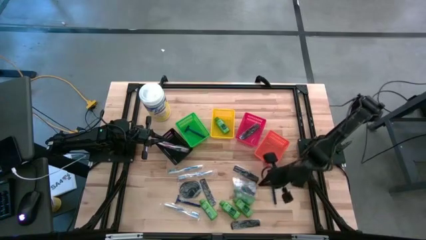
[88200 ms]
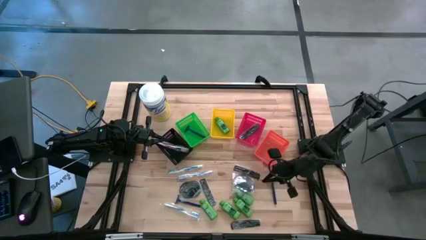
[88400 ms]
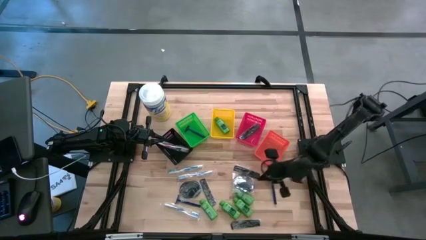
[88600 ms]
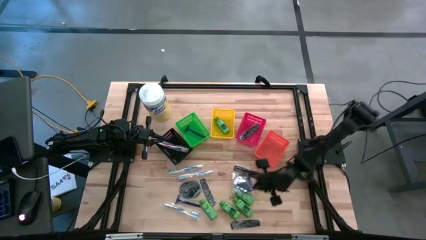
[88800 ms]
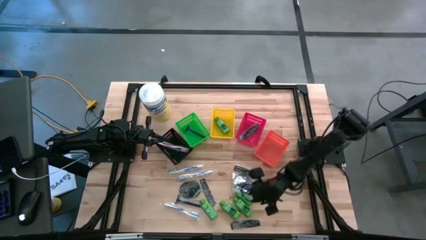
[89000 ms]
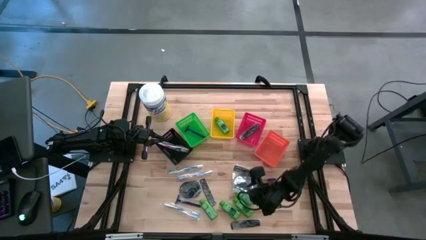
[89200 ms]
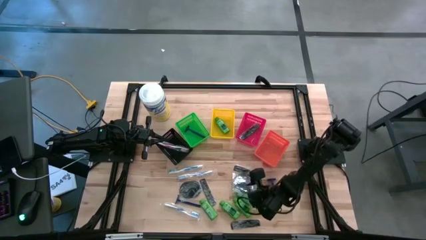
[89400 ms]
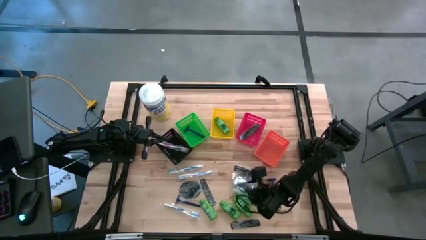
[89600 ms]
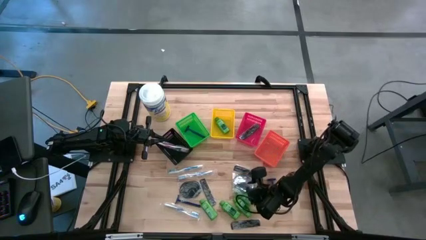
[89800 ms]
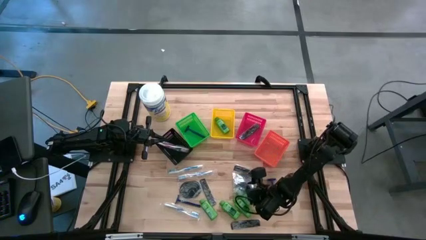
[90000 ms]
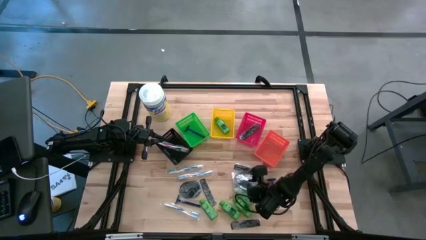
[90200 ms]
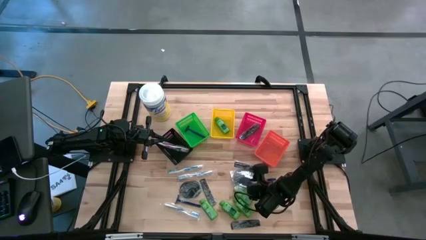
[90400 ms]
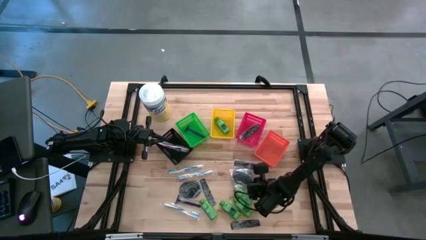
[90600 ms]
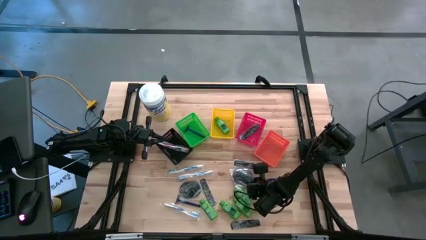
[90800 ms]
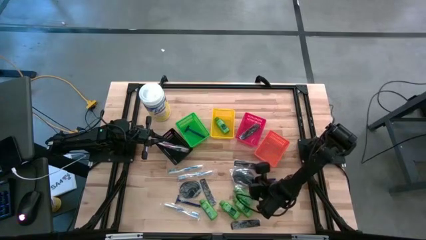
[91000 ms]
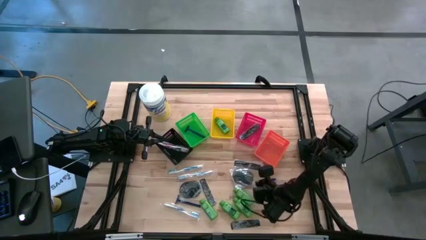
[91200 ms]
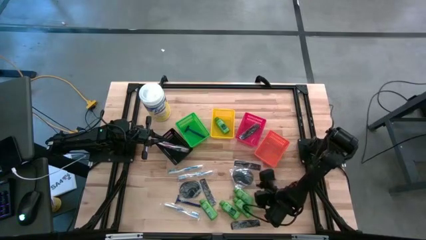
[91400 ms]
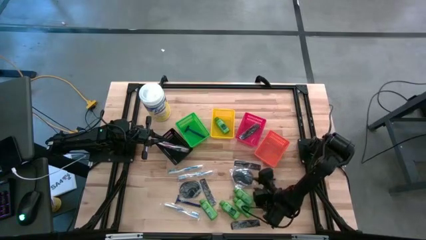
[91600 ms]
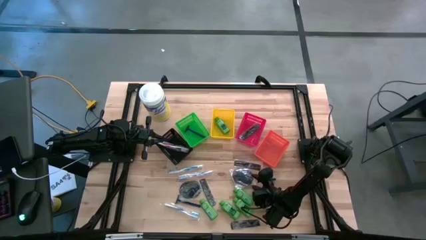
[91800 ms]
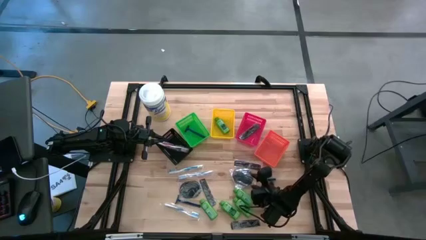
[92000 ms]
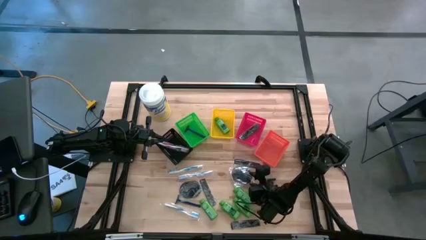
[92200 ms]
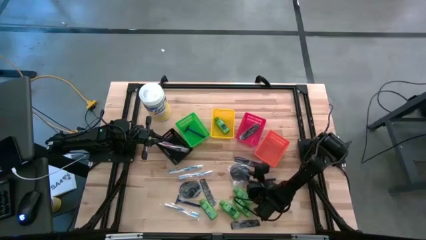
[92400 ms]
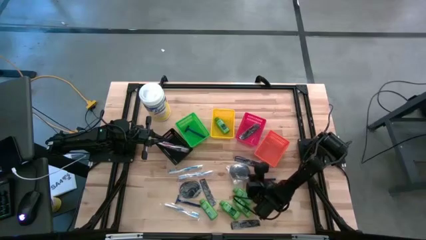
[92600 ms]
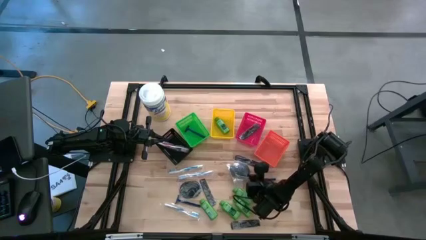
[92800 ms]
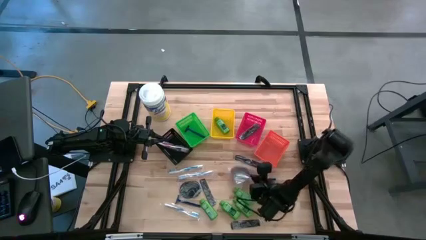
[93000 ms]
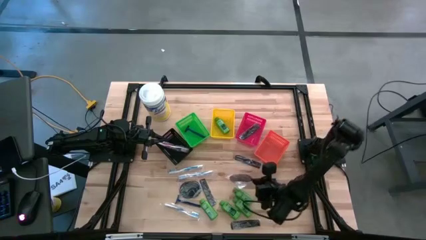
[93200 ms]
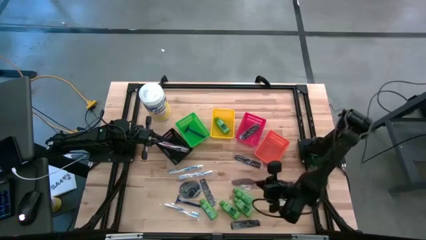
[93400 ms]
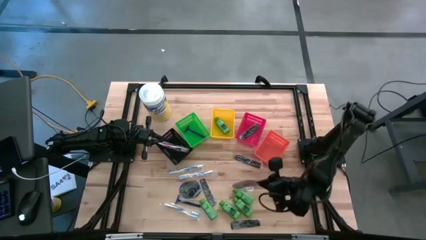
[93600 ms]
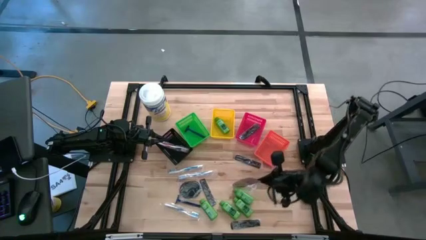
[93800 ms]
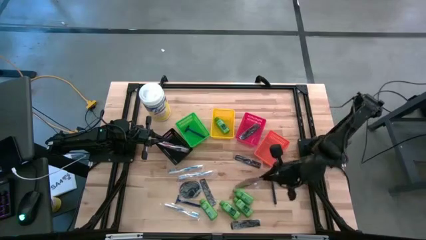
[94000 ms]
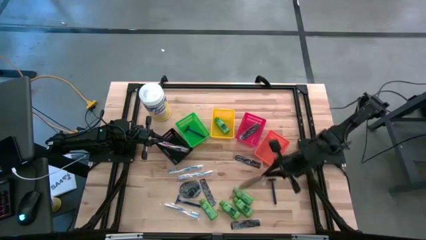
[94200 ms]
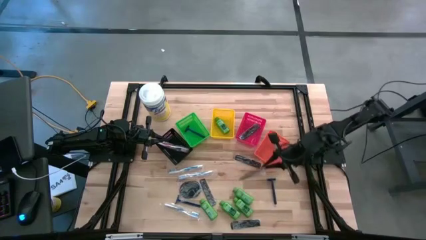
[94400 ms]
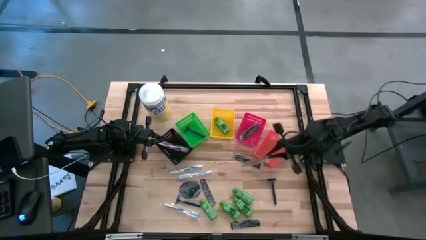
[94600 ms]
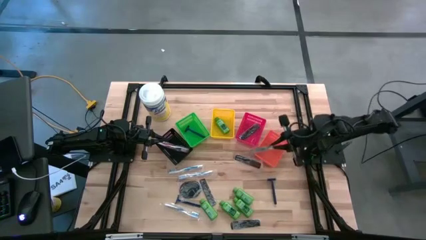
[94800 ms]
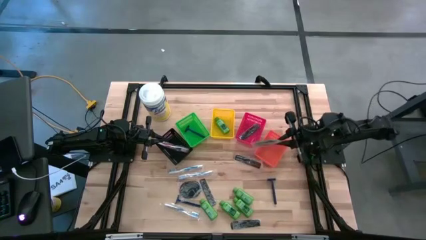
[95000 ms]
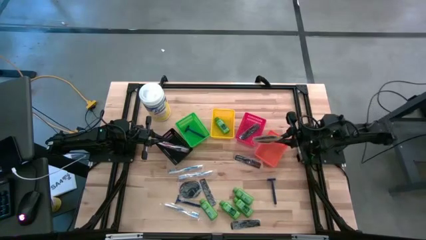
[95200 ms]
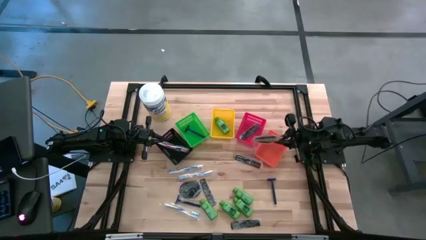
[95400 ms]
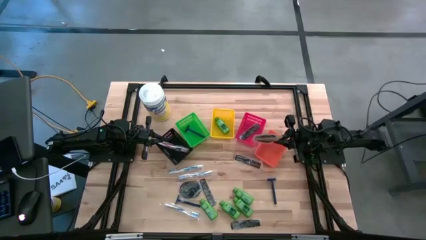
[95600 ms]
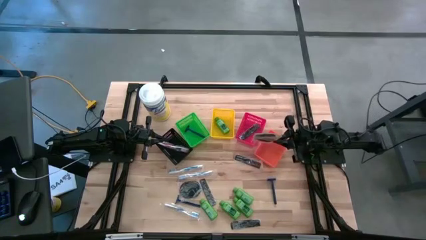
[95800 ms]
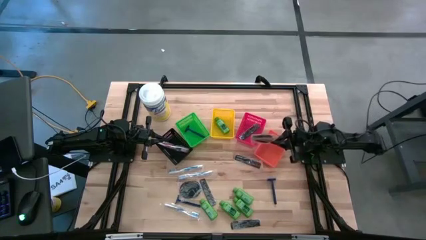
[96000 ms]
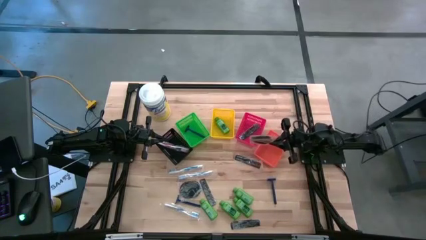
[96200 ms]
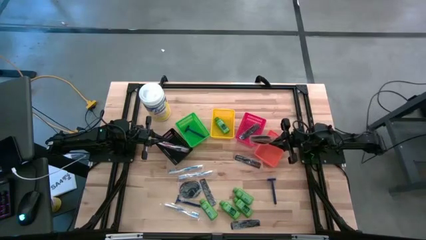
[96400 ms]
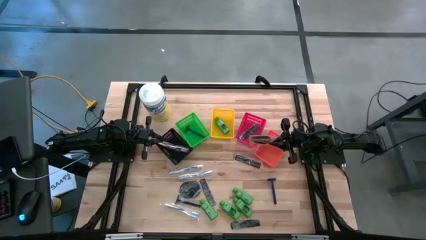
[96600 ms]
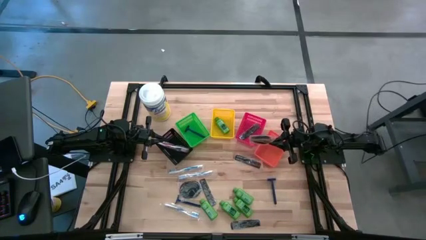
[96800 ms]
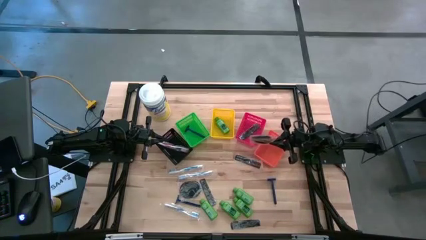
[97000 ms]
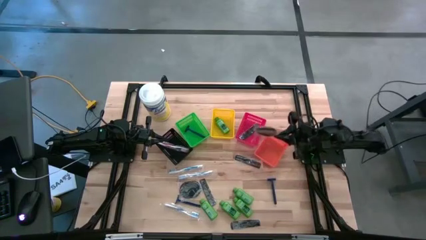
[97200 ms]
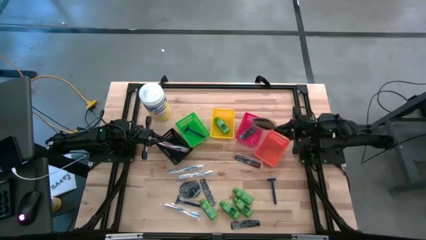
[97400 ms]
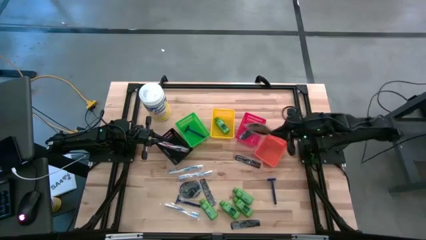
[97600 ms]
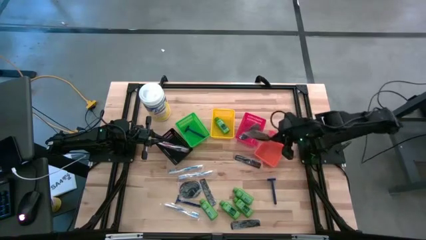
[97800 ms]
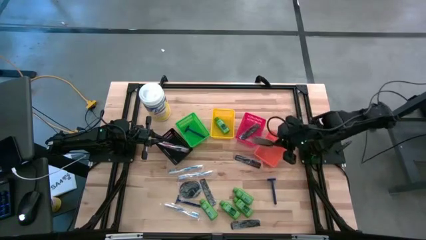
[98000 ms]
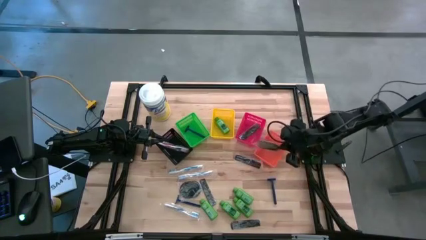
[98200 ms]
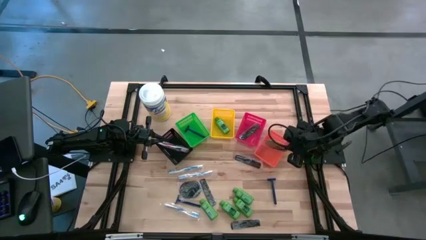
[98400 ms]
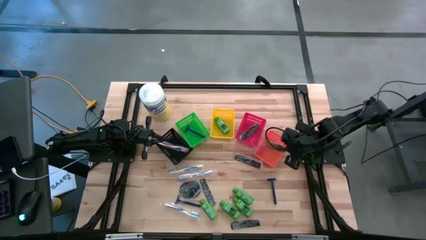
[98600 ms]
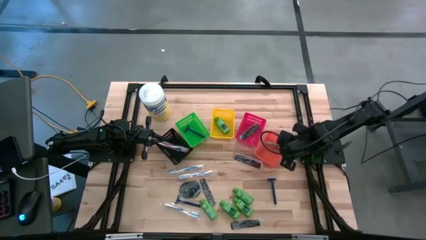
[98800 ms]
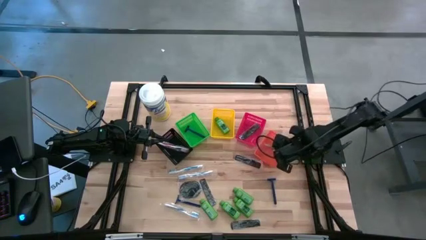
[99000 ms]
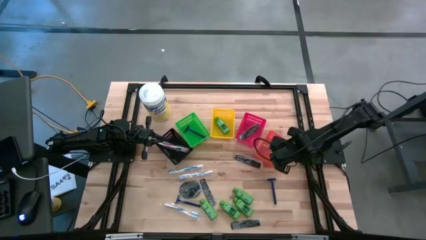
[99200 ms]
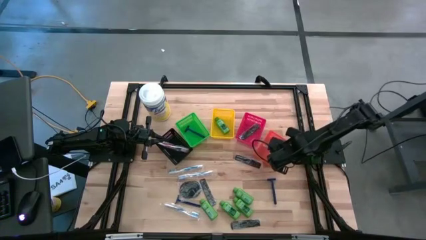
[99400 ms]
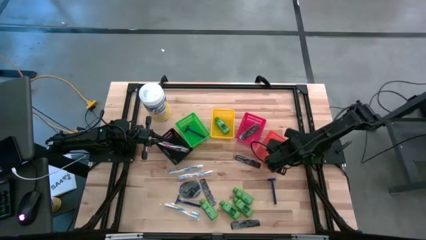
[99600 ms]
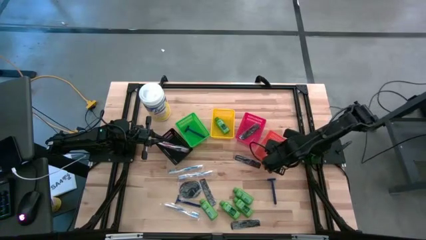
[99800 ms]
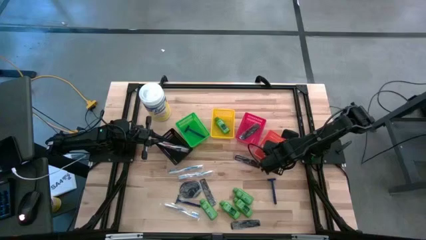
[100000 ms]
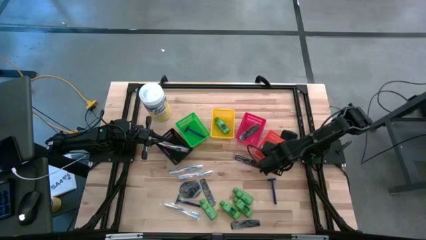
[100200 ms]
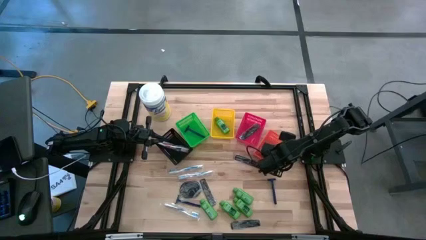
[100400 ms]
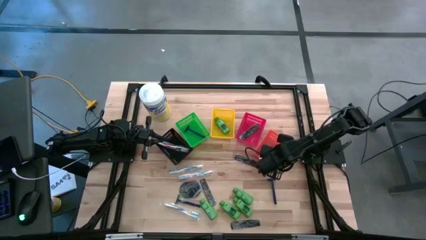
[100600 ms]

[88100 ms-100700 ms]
Task: Pick & Place Travel size toiletries
Put the right black hair brush into the orange bin

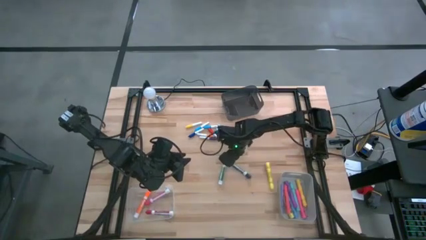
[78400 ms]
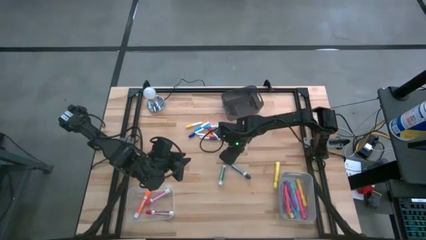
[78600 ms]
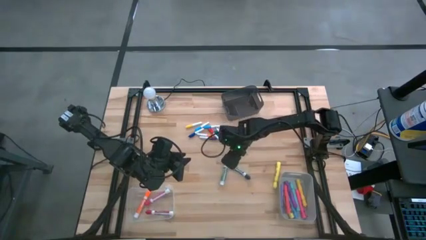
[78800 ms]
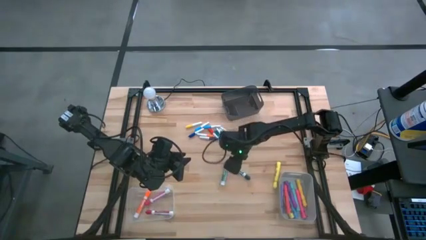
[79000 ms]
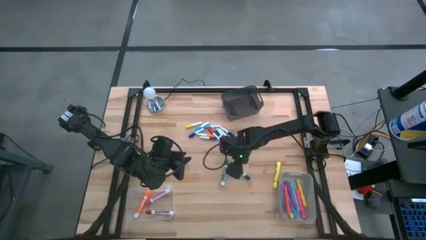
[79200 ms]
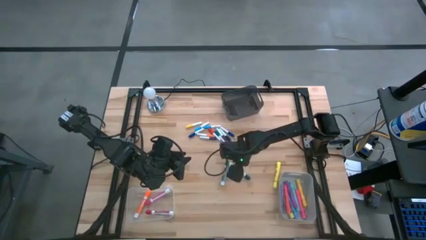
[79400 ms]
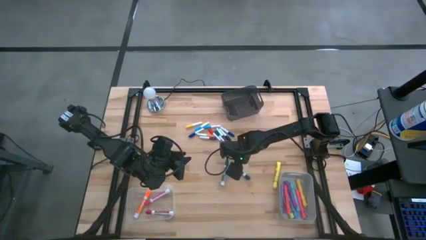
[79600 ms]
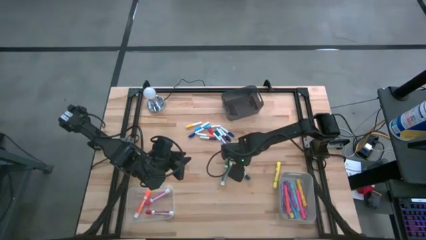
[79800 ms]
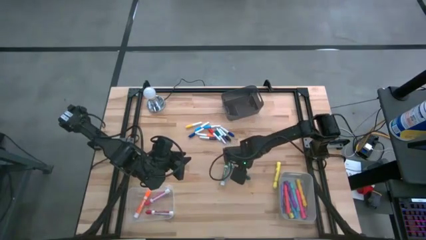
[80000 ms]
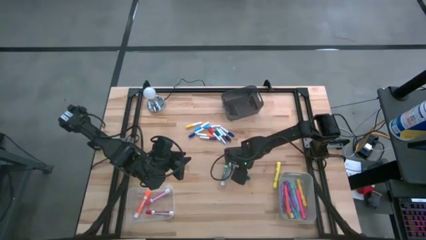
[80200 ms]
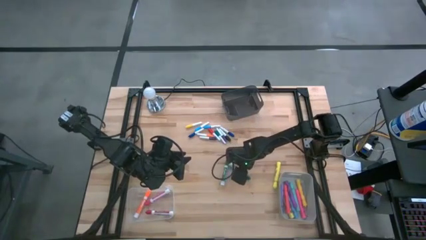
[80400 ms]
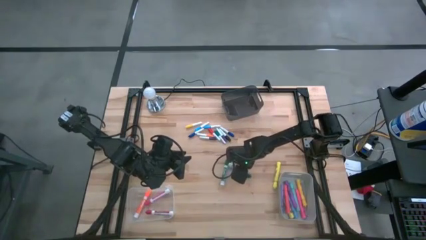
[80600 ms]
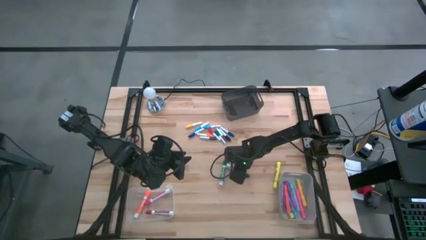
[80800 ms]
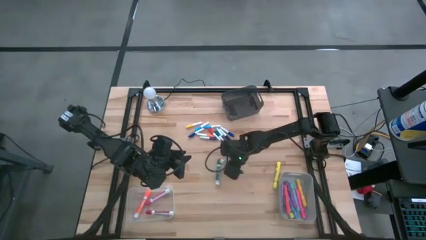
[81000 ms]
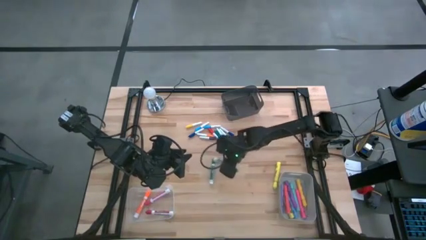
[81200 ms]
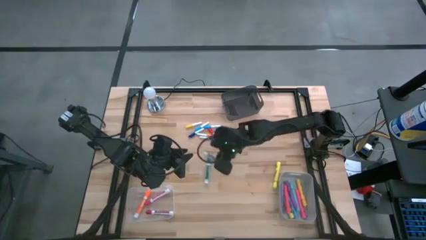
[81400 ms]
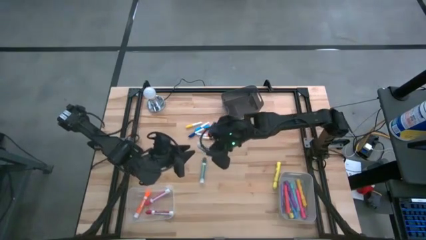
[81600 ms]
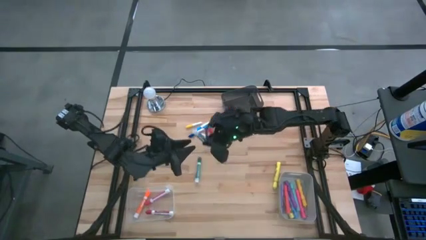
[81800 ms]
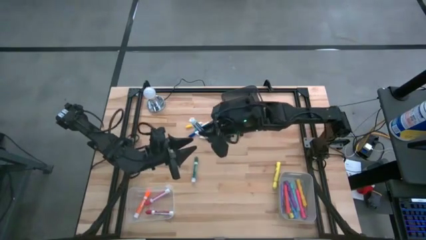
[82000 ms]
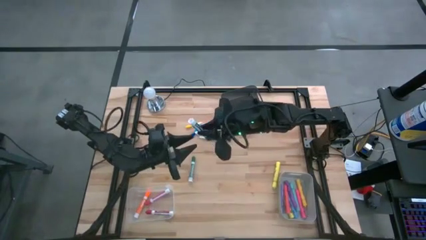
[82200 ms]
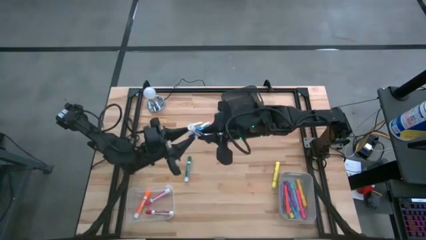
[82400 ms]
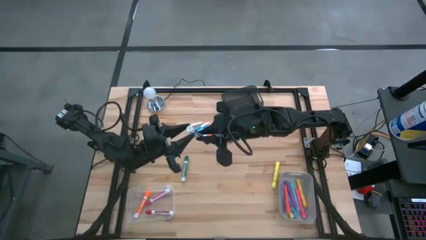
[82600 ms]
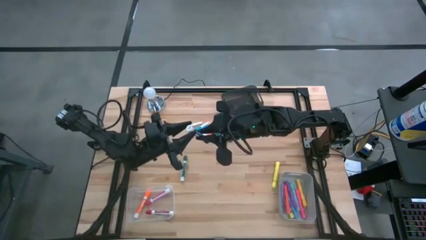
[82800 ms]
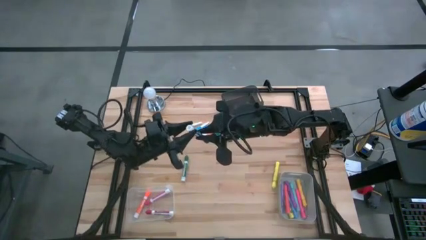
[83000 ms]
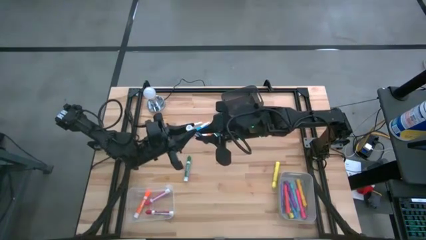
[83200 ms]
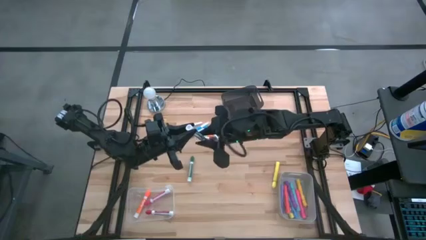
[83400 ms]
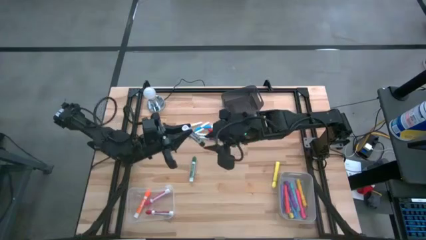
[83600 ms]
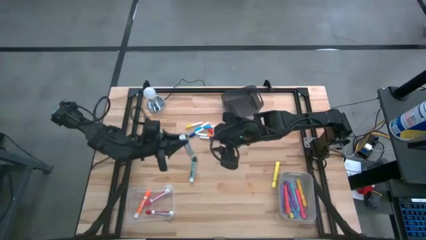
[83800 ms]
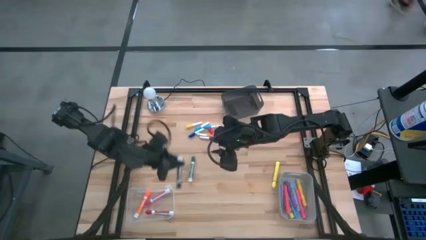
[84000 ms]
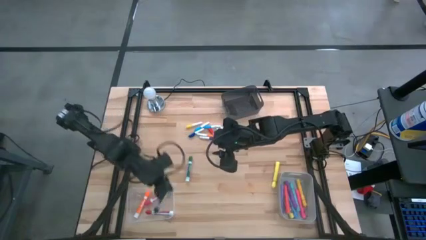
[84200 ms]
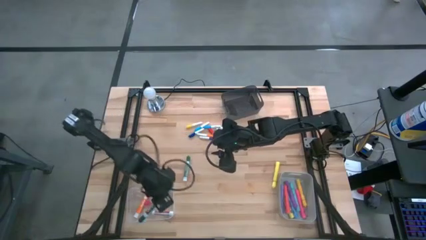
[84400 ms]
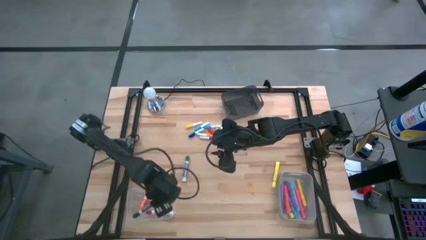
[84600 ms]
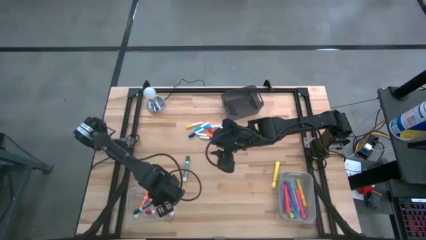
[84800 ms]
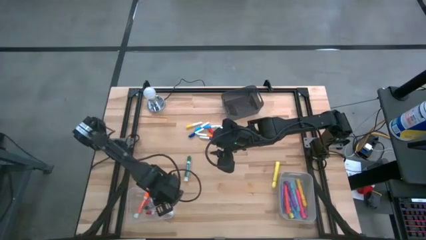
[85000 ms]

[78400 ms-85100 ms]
Task: Pick & Place Markers
Put the right green marker pen into the transparent bin
